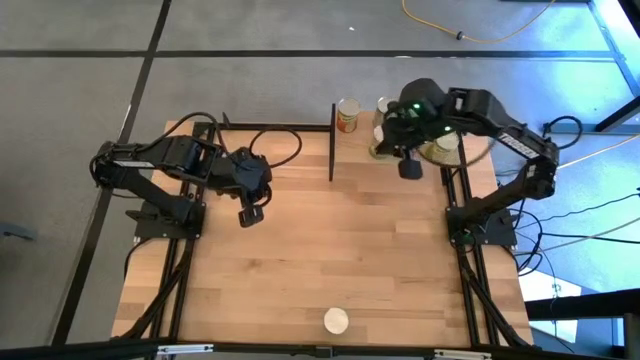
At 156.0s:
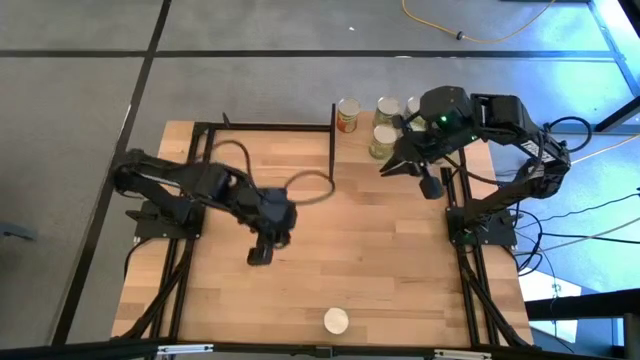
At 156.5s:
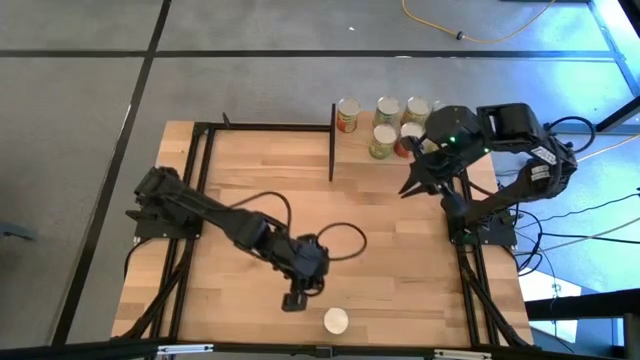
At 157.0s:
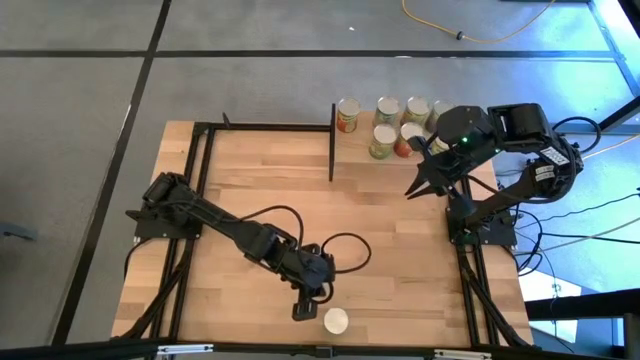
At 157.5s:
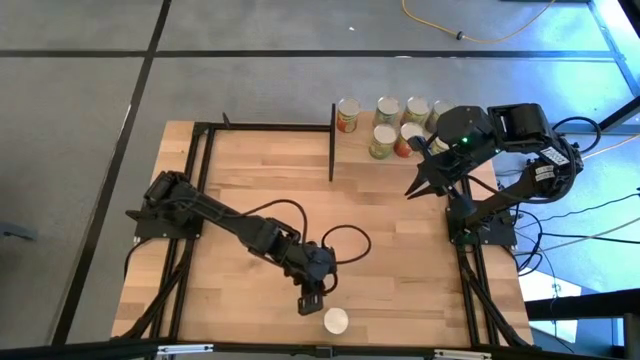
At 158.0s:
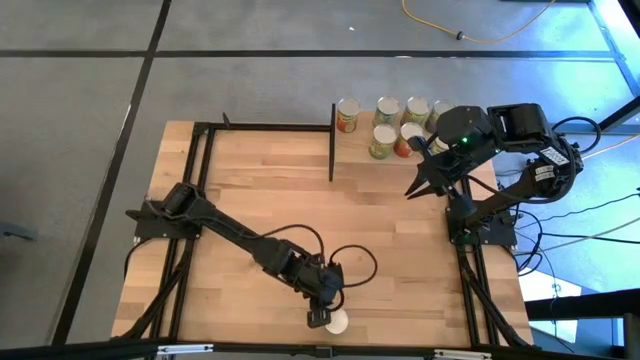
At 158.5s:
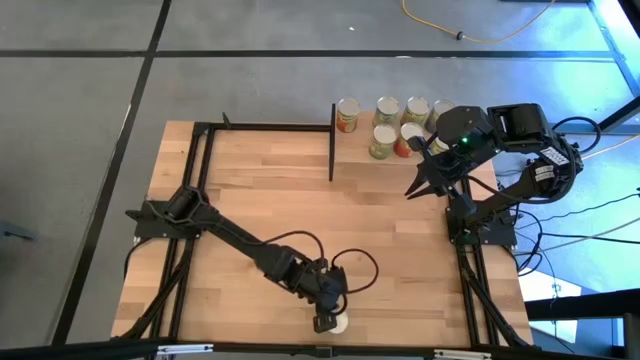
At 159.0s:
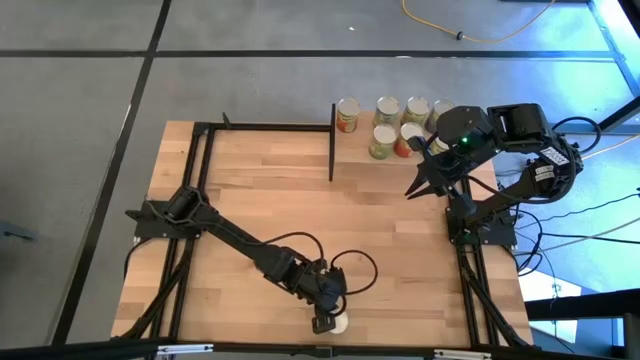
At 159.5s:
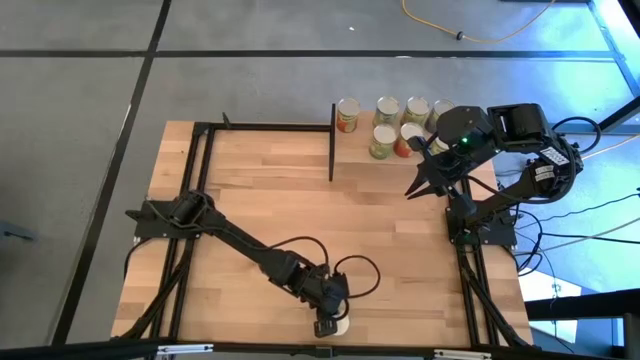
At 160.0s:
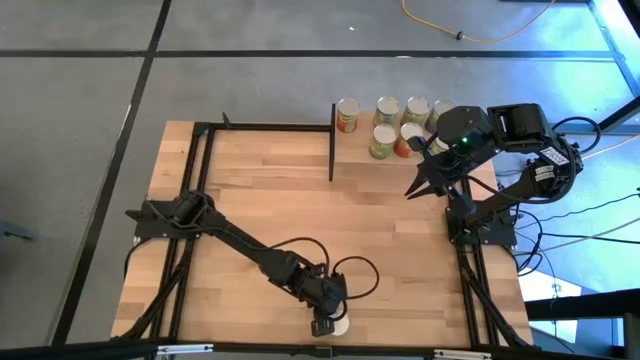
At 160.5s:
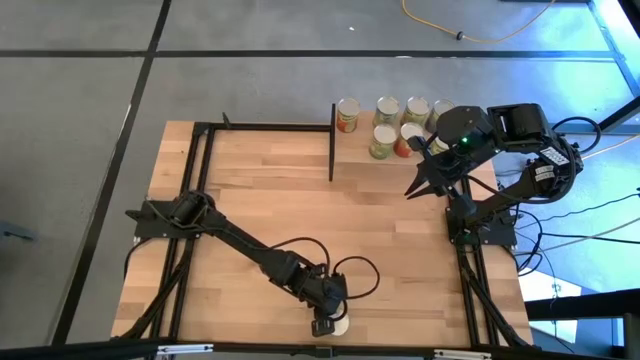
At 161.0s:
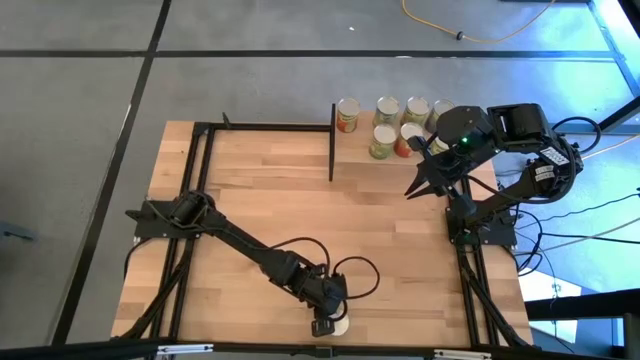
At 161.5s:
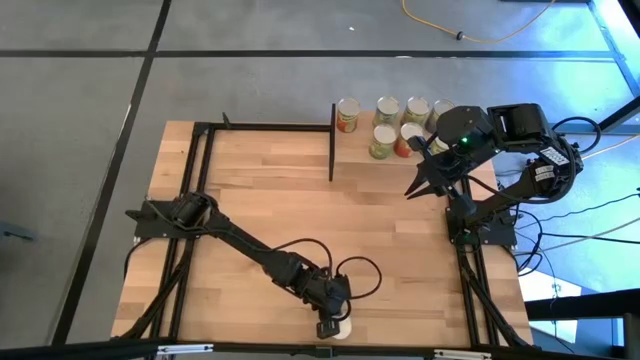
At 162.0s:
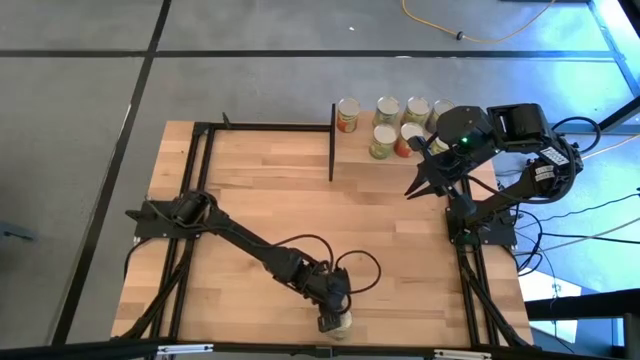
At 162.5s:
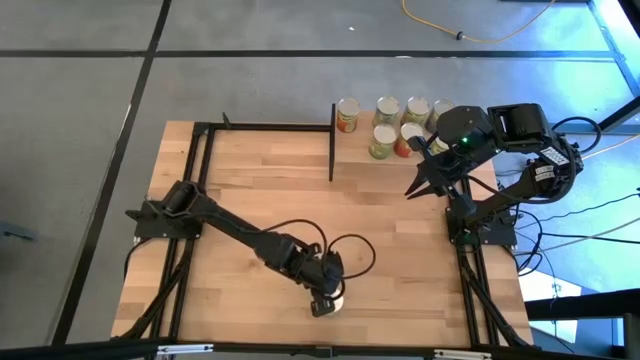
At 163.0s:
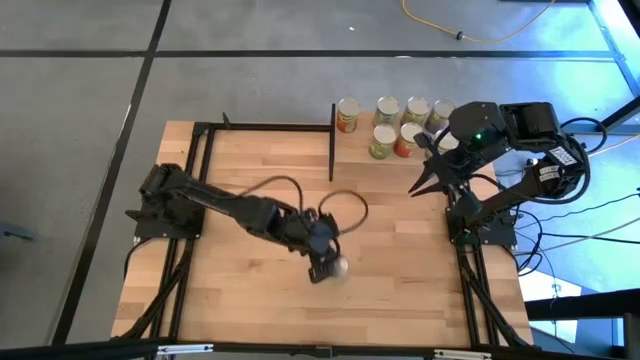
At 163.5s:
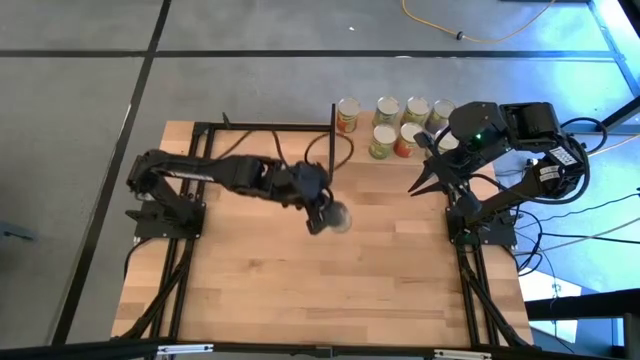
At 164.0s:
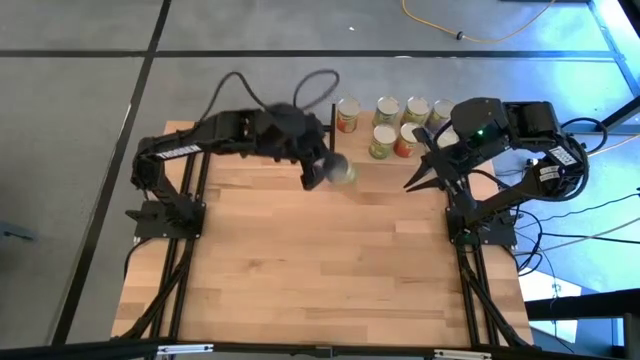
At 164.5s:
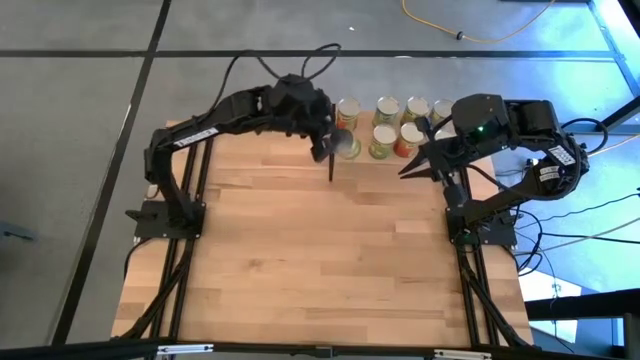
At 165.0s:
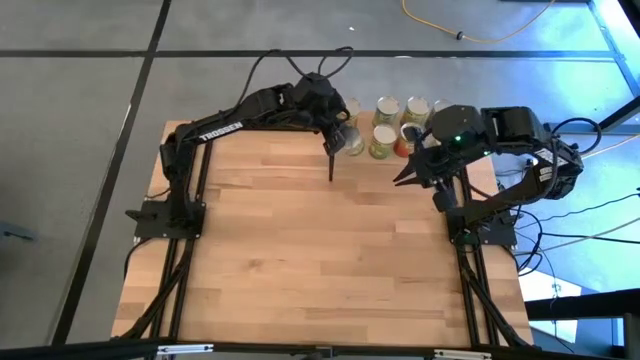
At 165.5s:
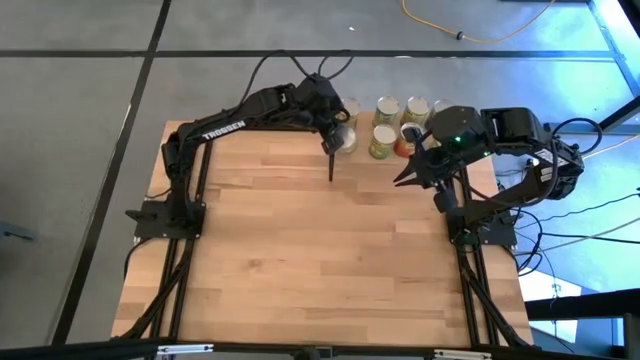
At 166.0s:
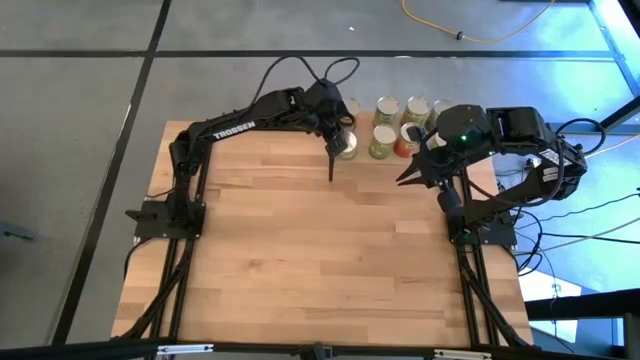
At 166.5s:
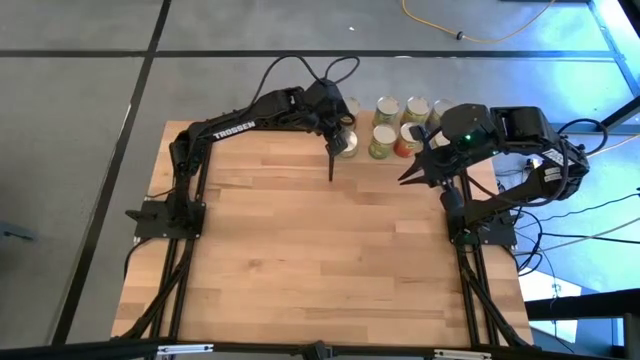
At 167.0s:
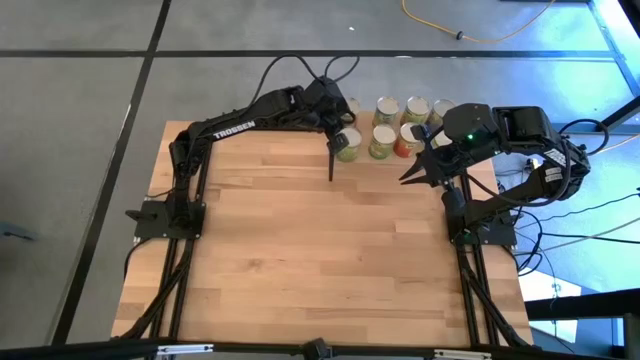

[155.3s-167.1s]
Task: Pick and place cans onto a shelf
Put the canned pears on the shelf

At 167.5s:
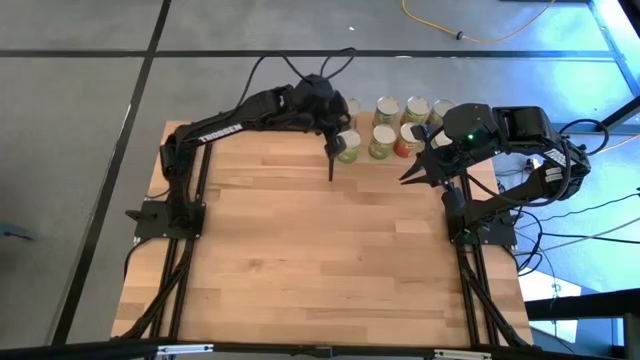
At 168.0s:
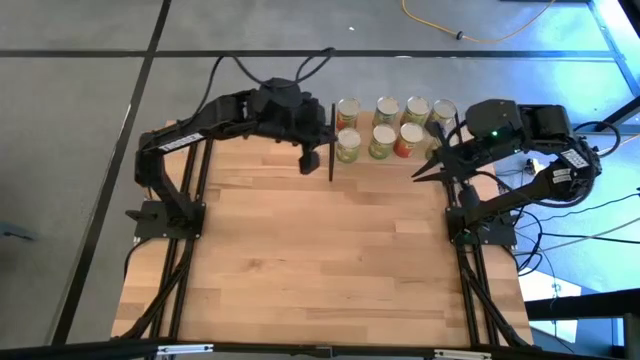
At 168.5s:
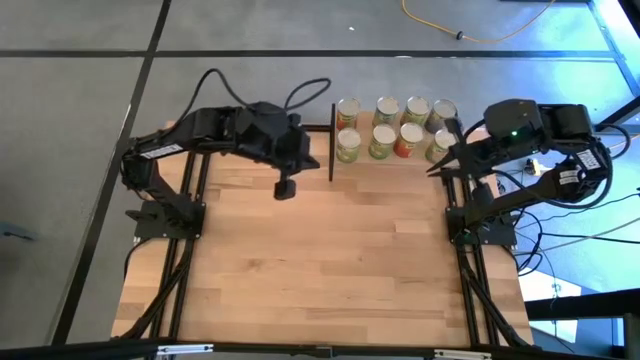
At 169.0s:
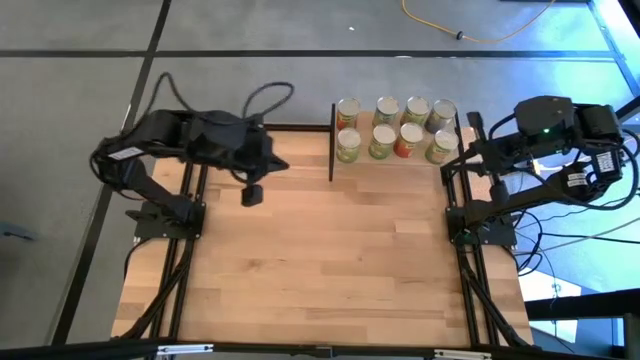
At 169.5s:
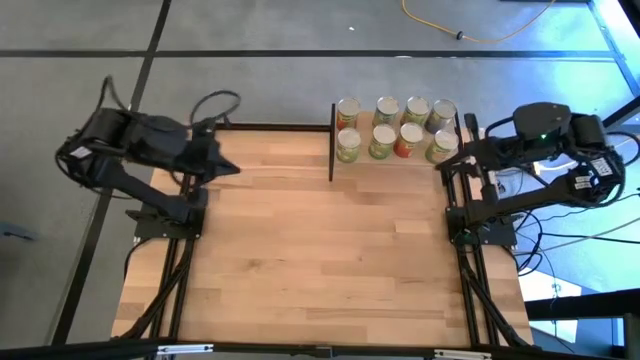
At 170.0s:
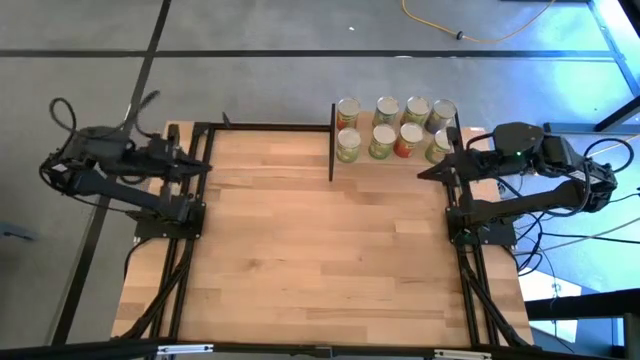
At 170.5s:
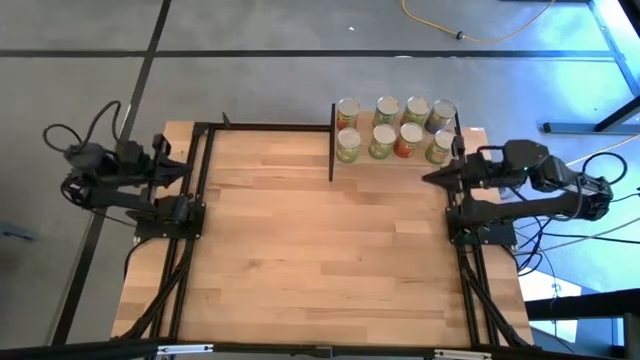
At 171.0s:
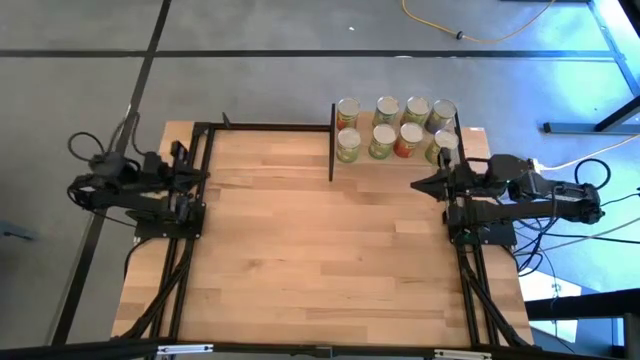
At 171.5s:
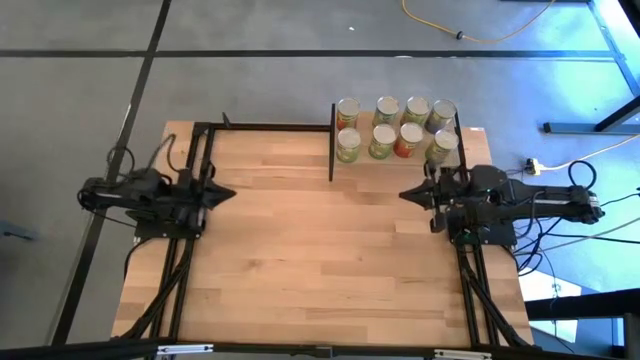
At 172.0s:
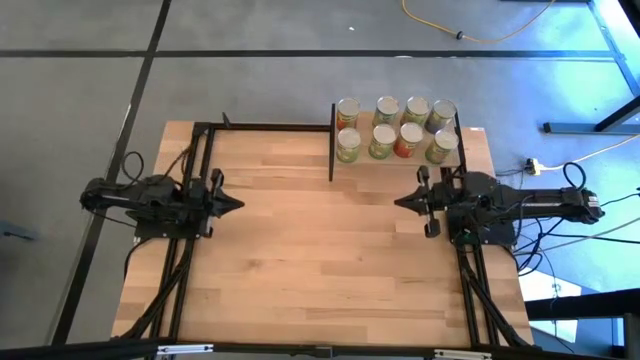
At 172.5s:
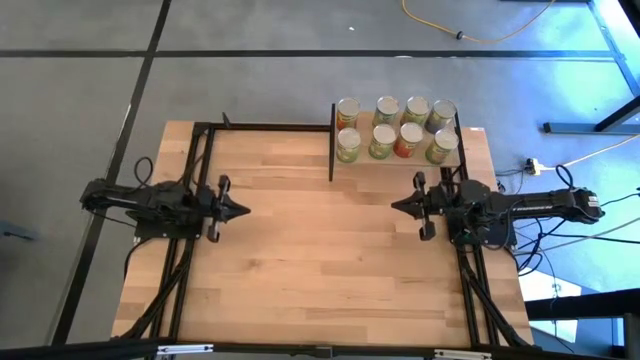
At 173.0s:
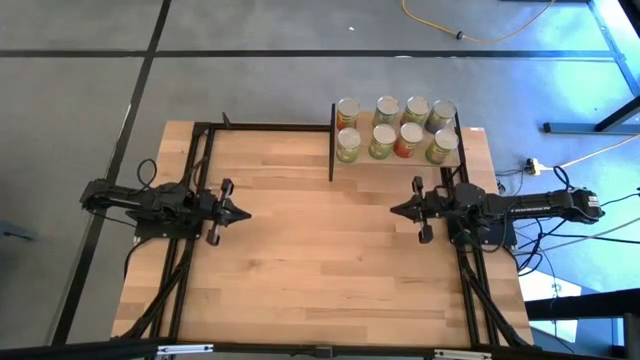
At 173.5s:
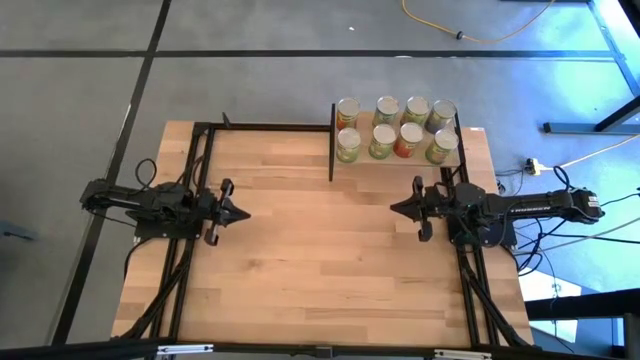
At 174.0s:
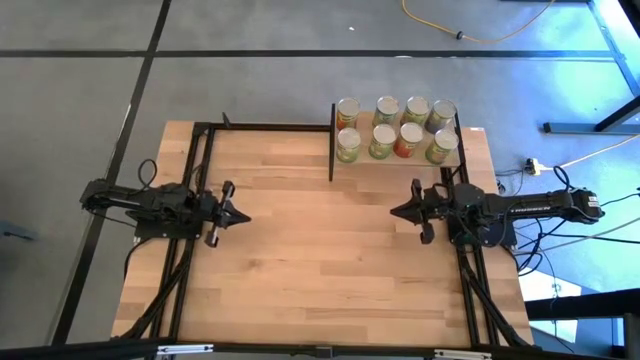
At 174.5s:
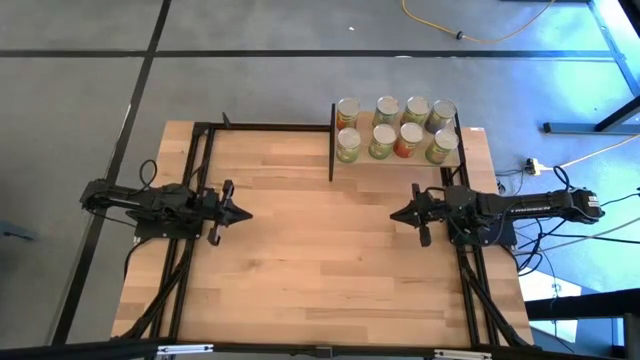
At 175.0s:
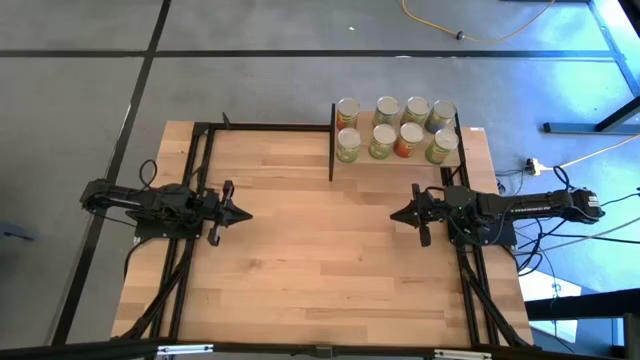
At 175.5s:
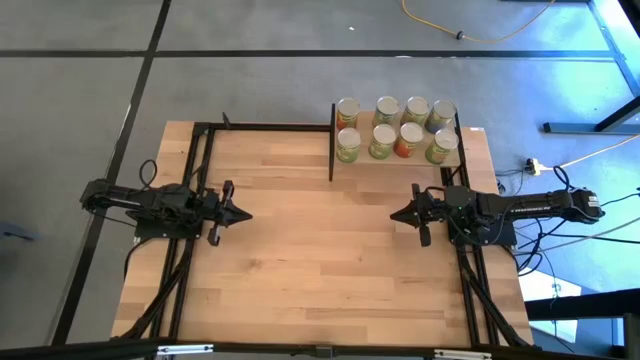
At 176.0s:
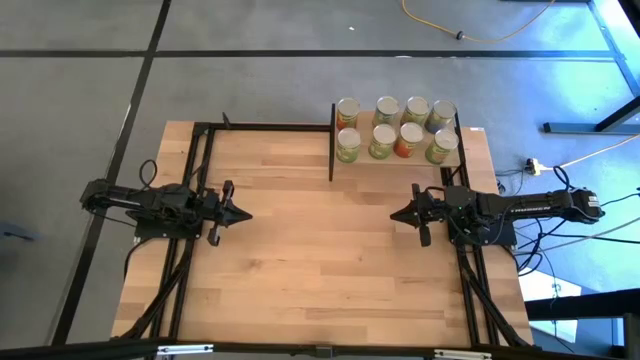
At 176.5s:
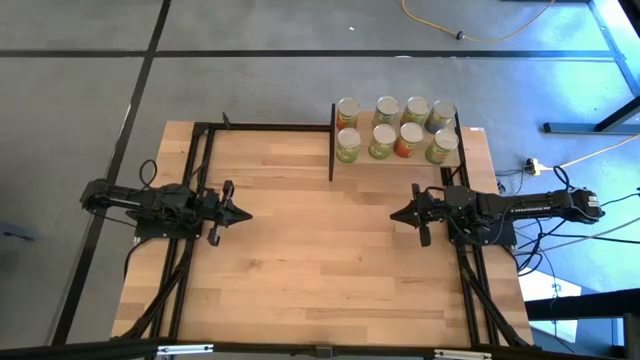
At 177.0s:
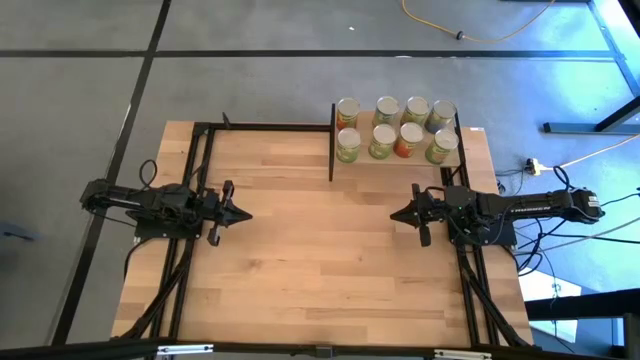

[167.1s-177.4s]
Return to Home Position
